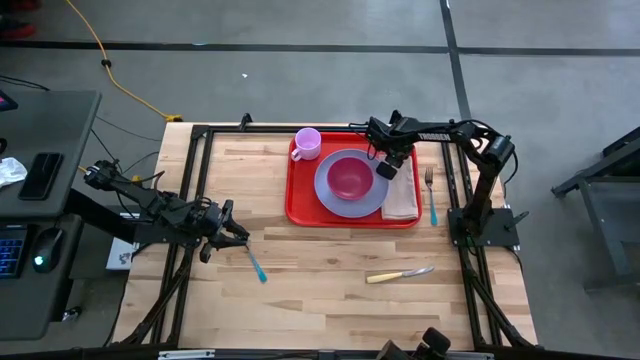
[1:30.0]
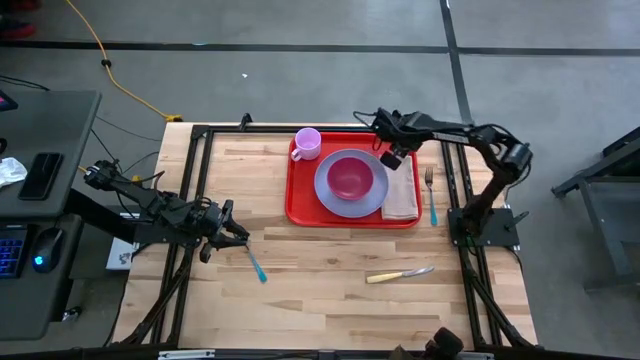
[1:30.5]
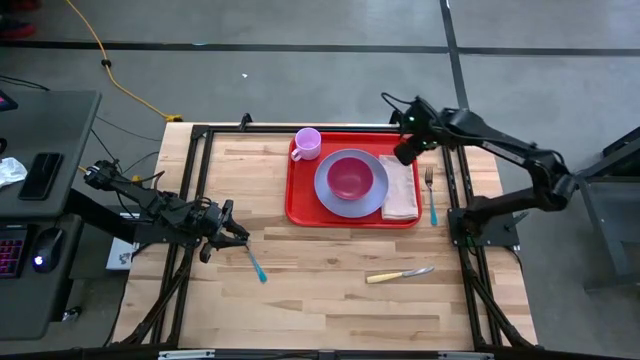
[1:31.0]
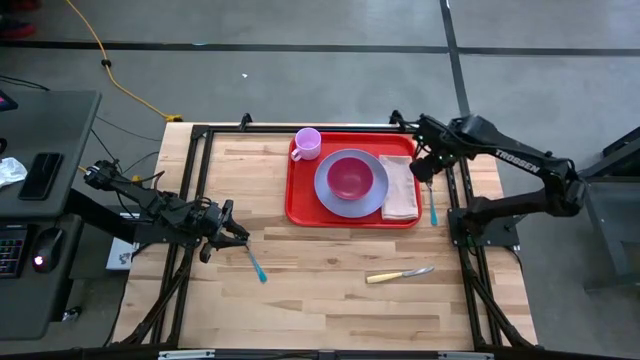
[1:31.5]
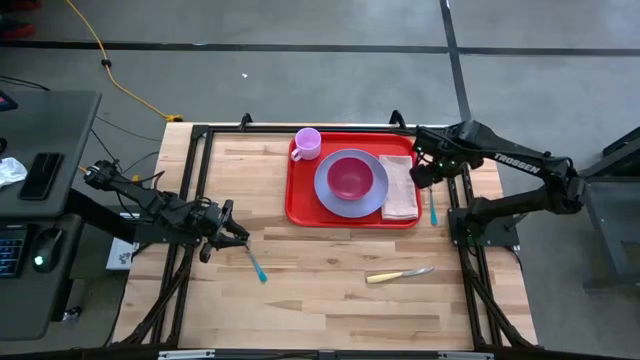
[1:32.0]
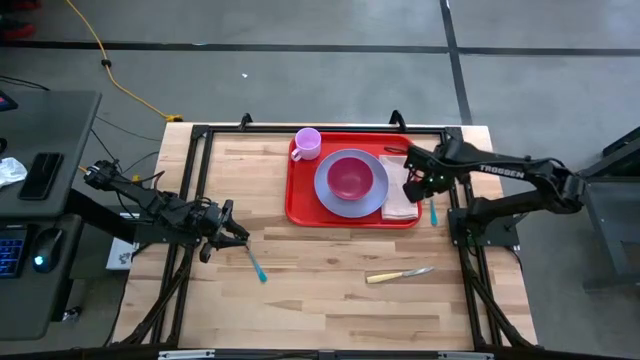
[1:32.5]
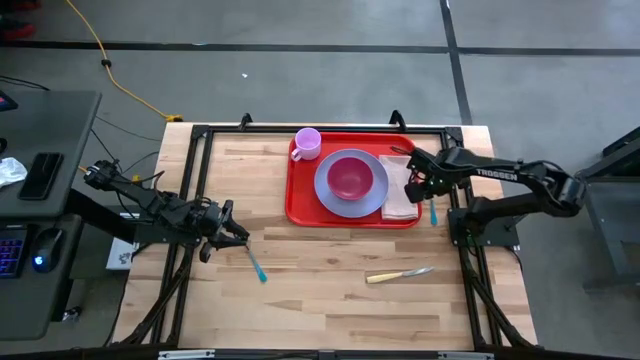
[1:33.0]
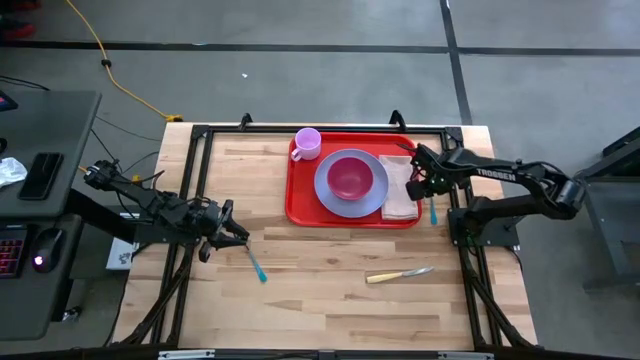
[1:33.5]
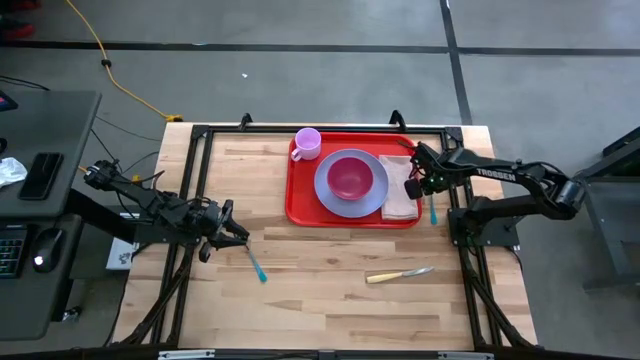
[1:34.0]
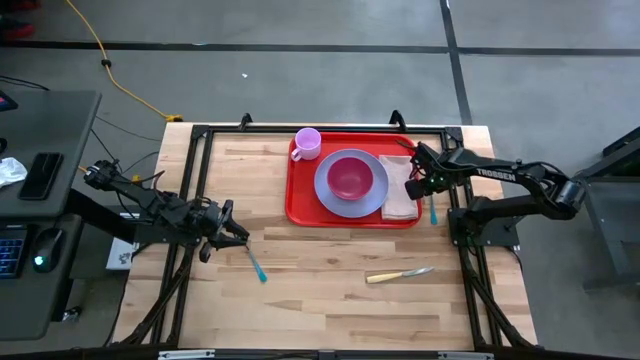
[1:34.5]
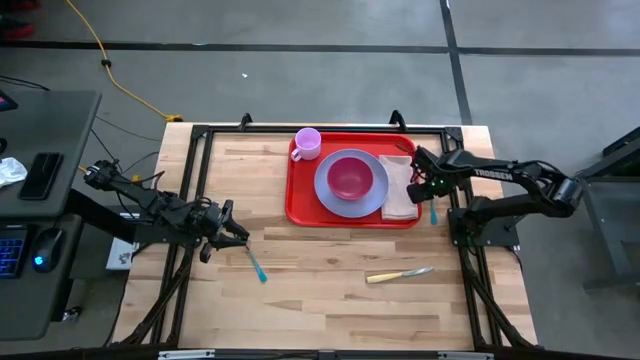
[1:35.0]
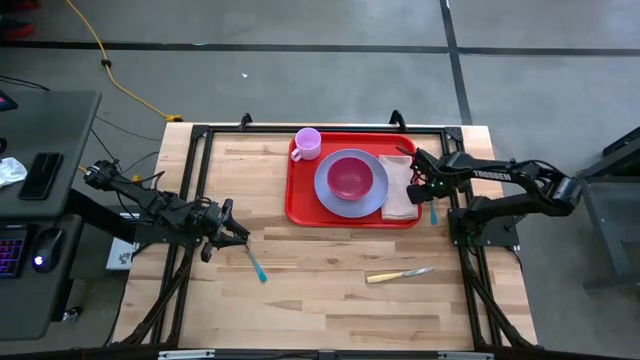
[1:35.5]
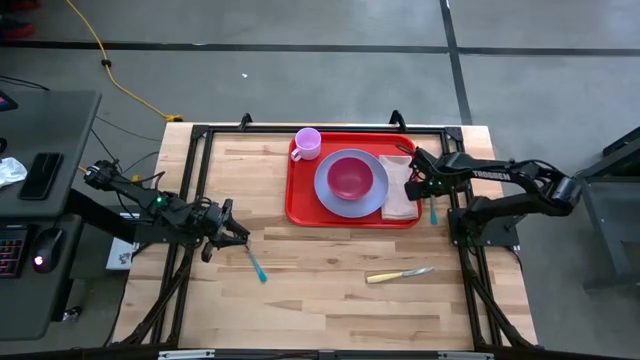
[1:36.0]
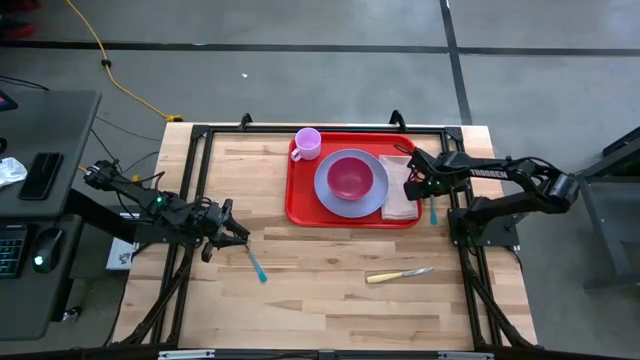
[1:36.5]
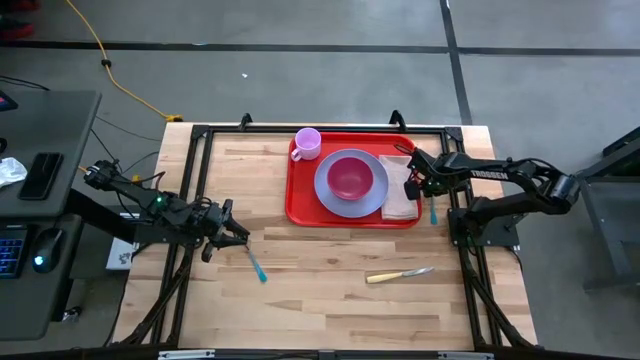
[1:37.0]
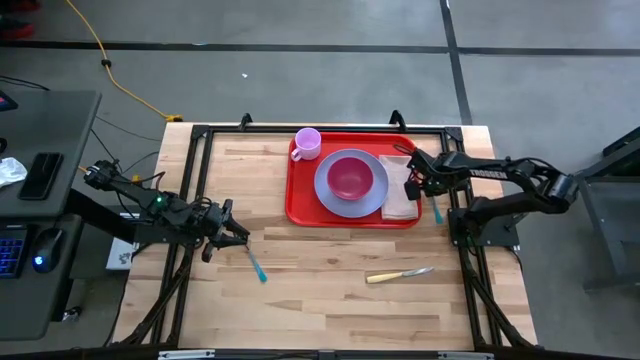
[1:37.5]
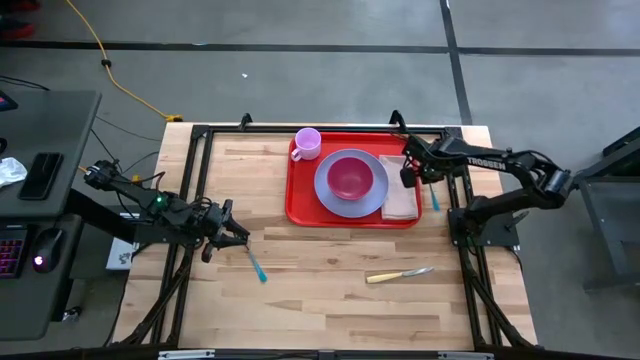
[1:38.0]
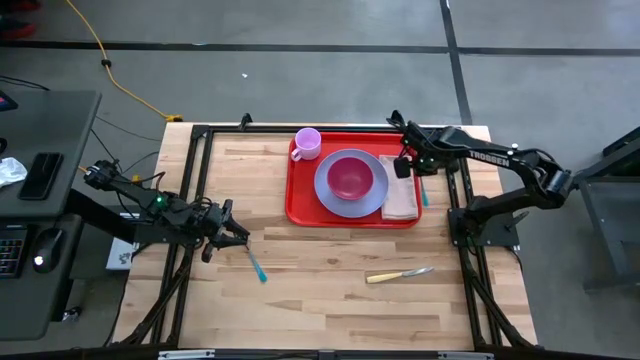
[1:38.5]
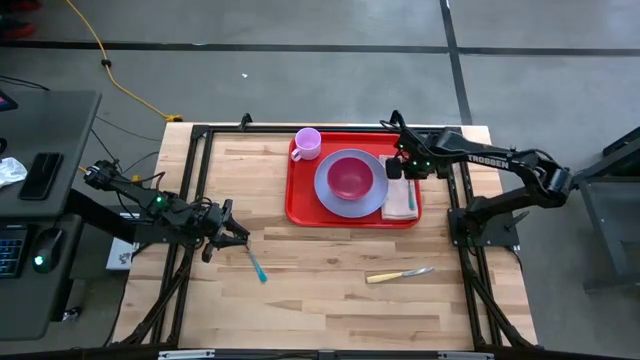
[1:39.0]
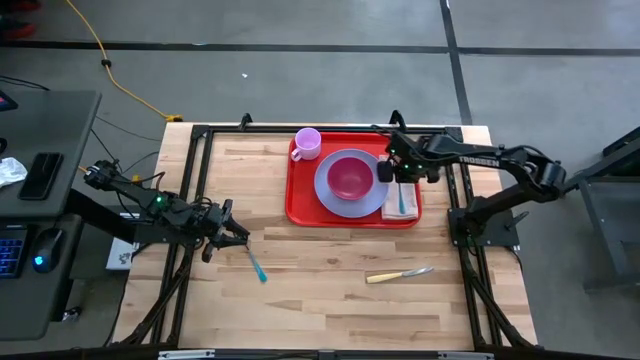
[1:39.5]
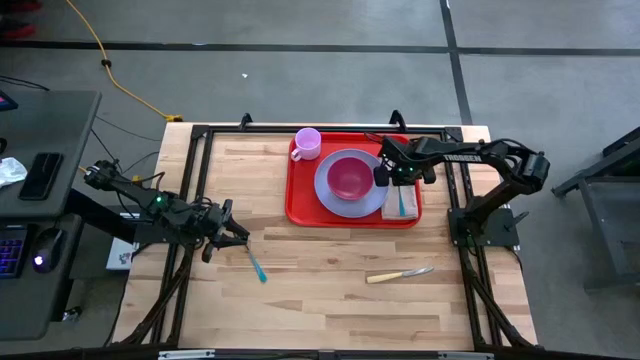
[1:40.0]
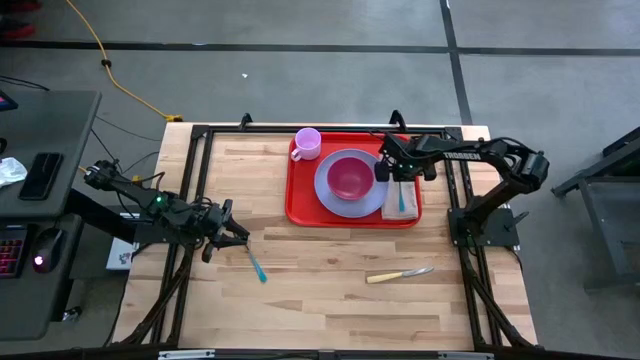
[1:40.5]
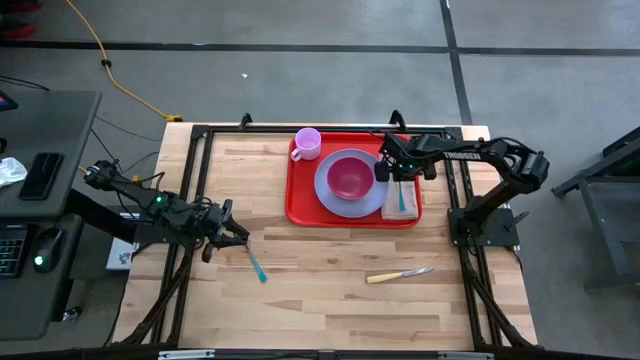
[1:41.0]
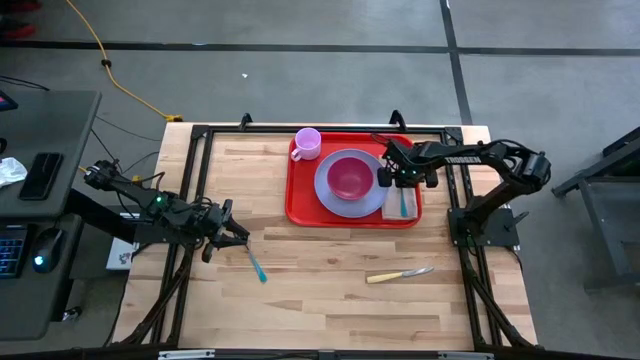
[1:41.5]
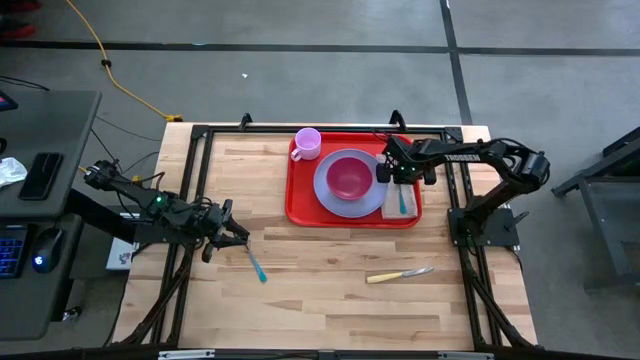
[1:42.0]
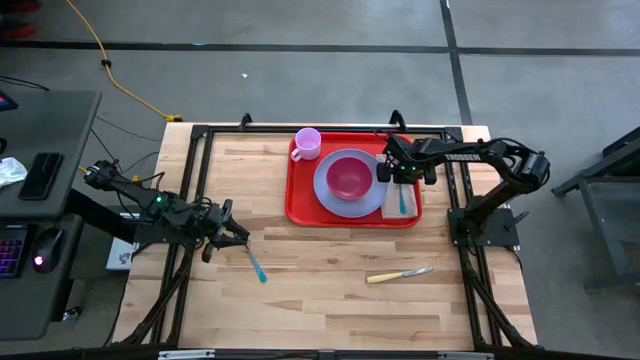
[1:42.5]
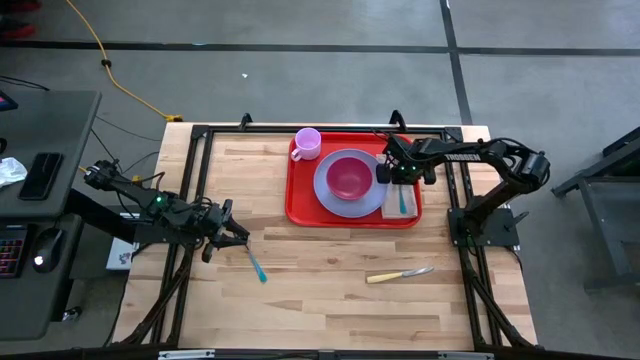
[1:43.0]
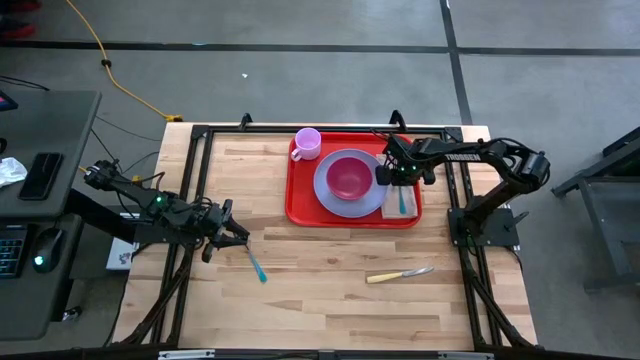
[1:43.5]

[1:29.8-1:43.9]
Task: Set up tray
Put the blue fork on the white napkin on the red serving tray
